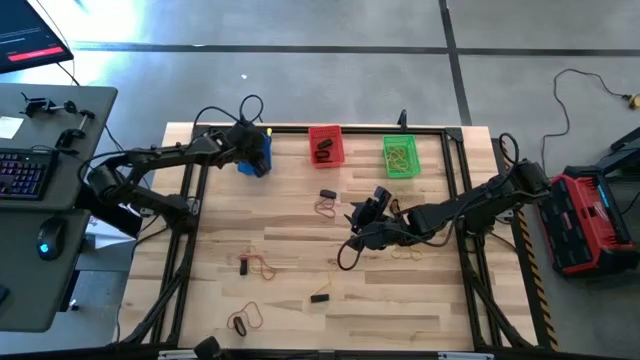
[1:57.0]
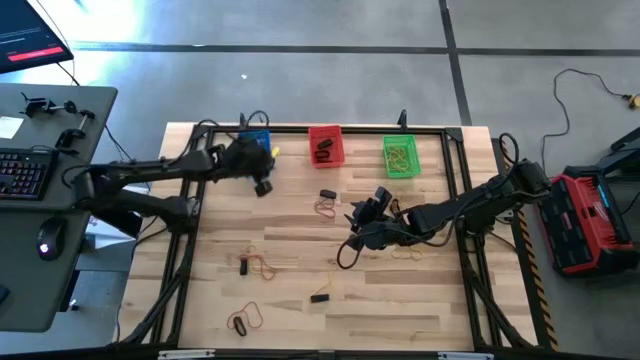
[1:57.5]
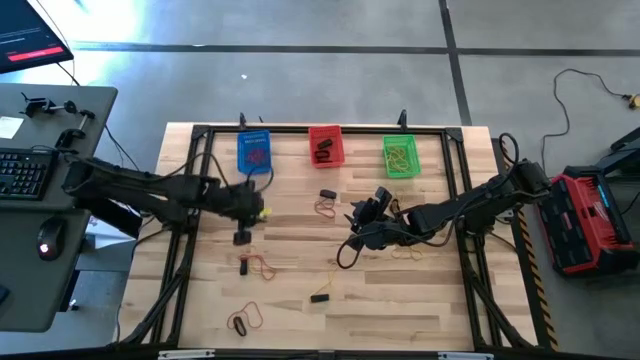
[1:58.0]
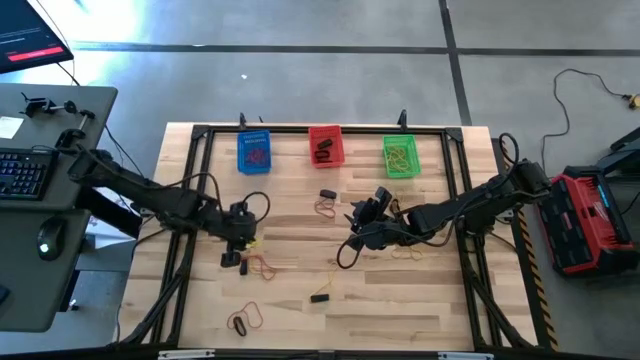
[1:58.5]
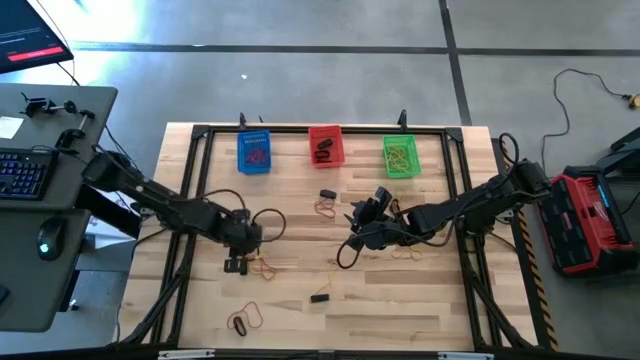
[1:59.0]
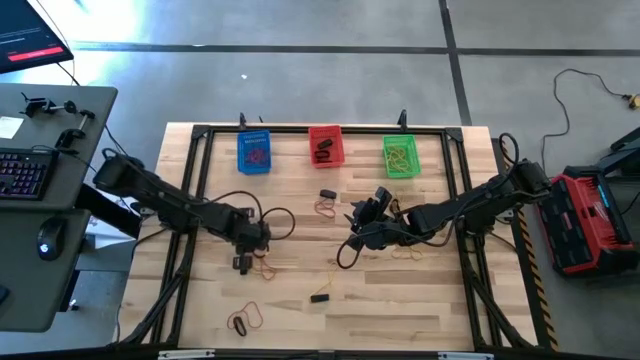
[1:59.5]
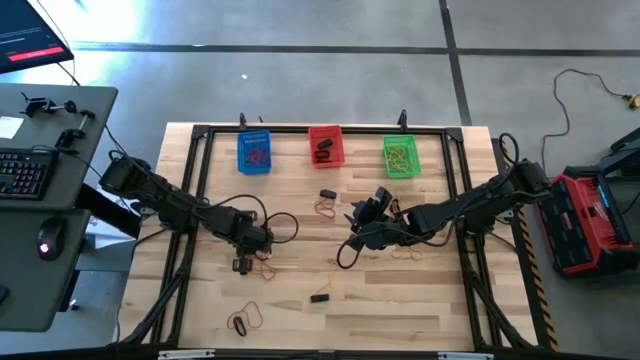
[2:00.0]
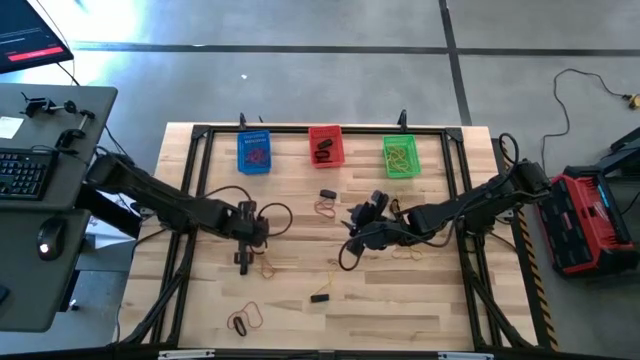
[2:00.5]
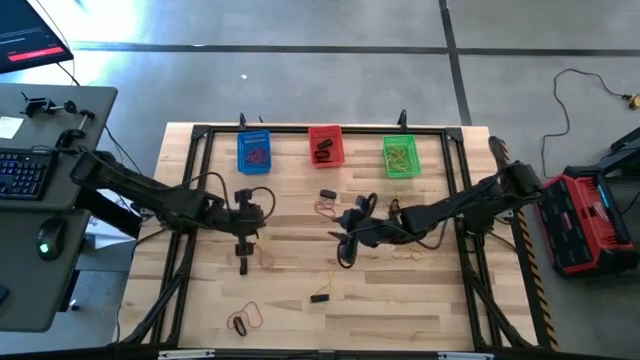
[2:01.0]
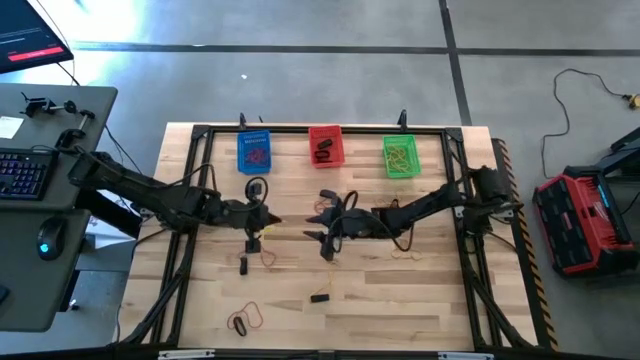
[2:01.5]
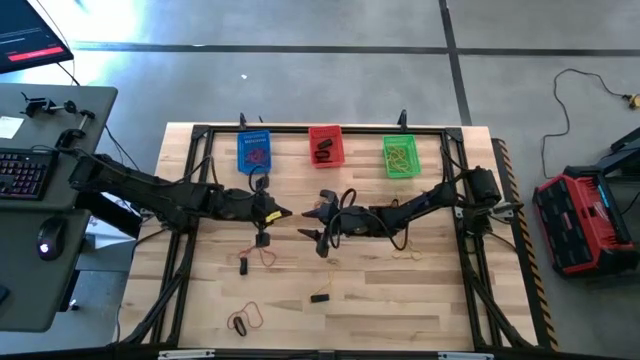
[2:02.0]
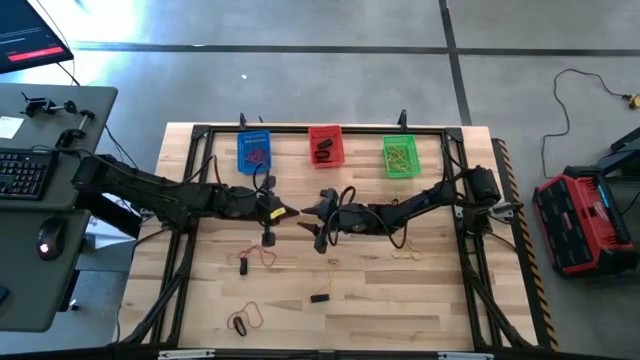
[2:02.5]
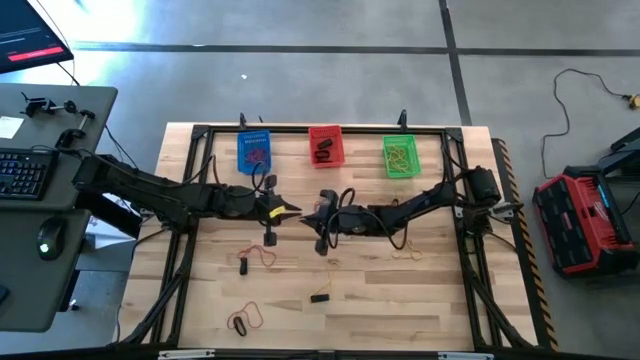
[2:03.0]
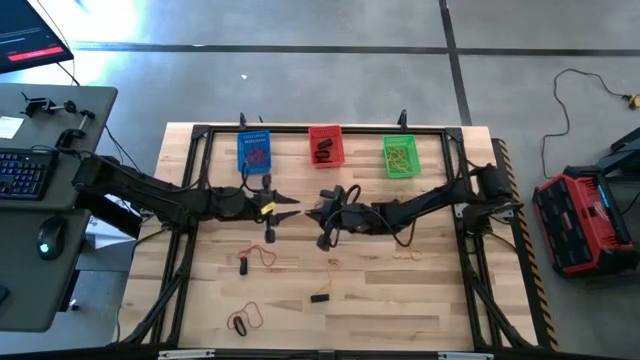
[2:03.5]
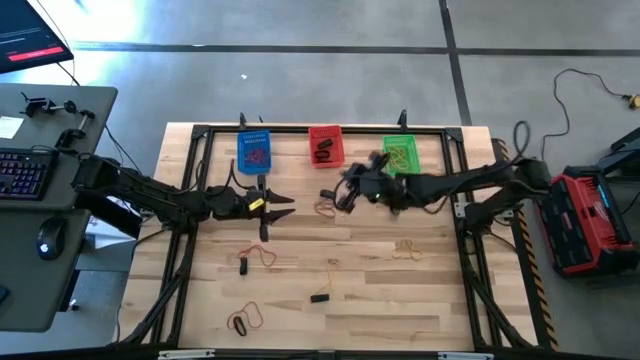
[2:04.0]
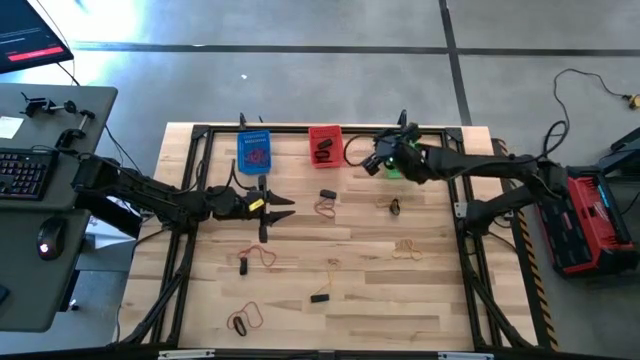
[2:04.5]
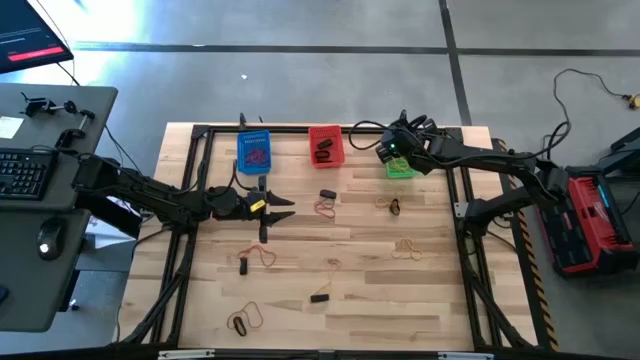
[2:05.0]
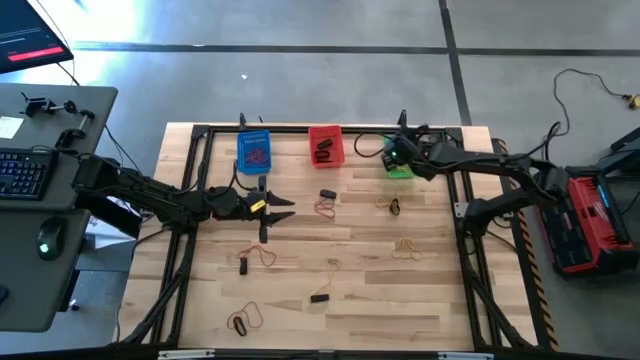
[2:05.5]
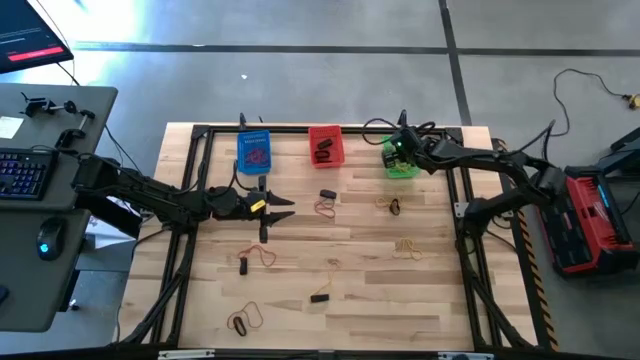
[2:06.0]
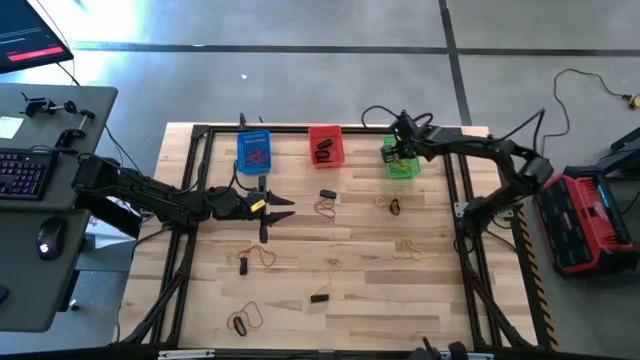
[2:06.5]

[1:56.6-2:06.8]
Task: Sort rubber bands into baskets
Put the yellow rubber band into the green bin

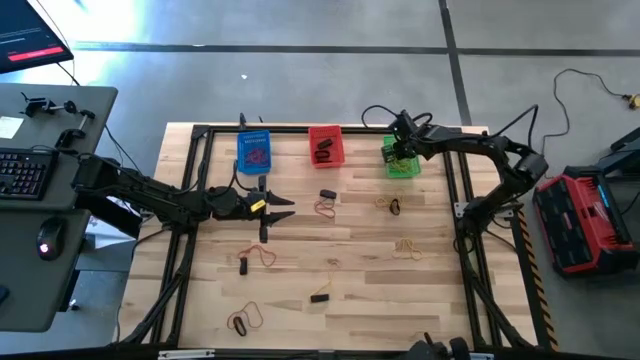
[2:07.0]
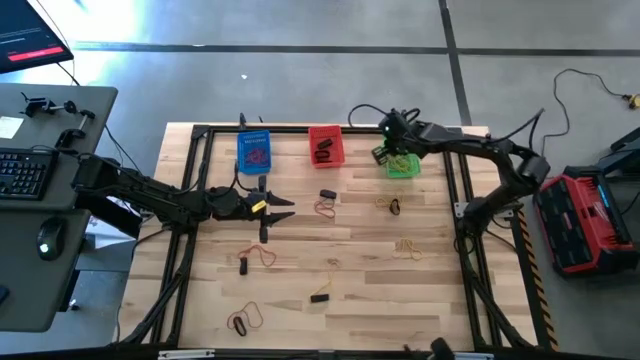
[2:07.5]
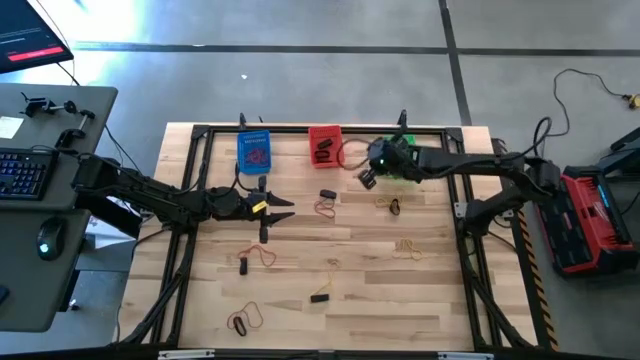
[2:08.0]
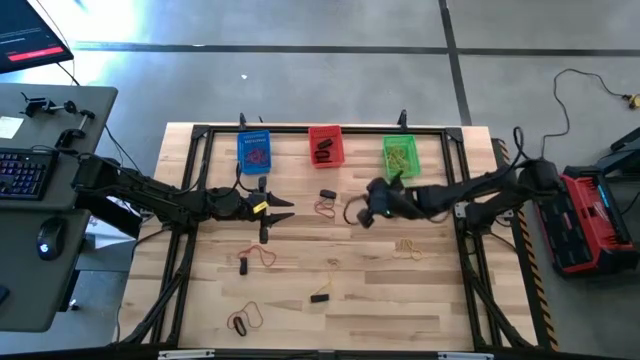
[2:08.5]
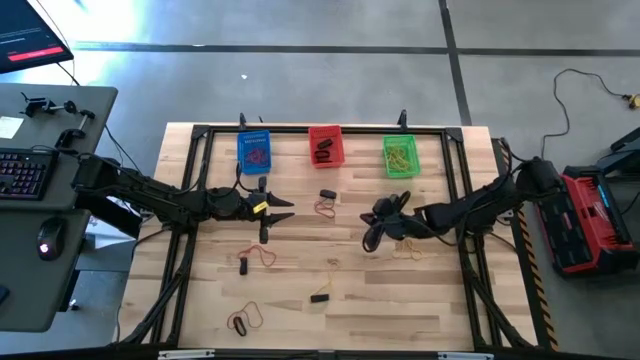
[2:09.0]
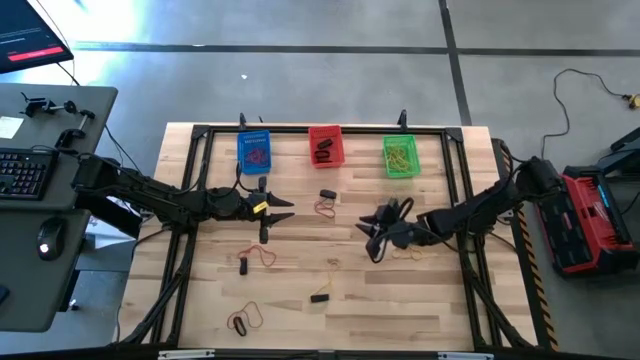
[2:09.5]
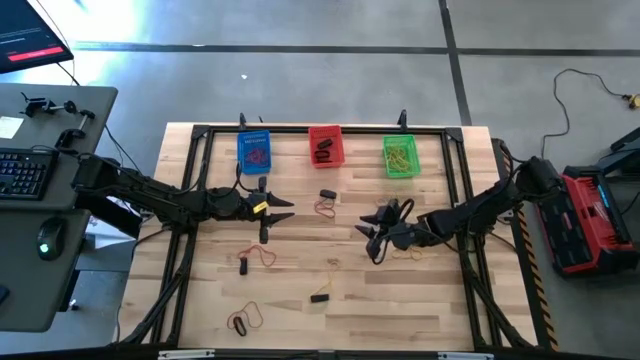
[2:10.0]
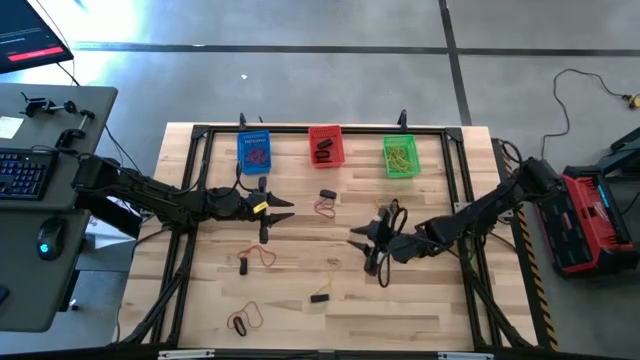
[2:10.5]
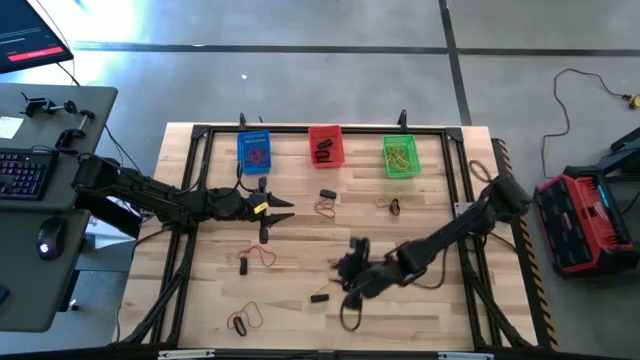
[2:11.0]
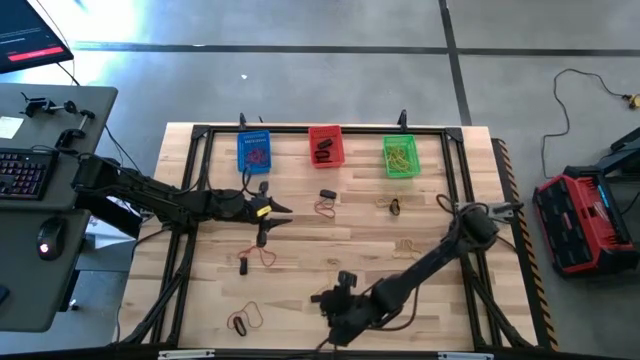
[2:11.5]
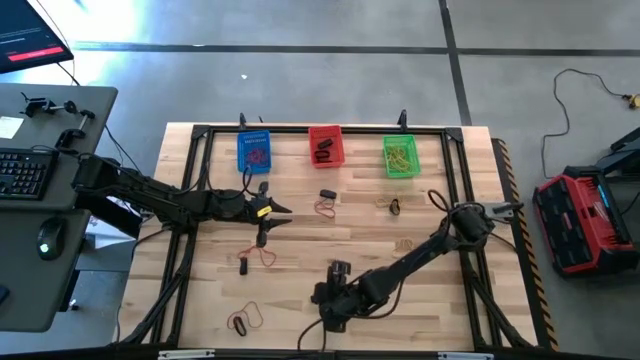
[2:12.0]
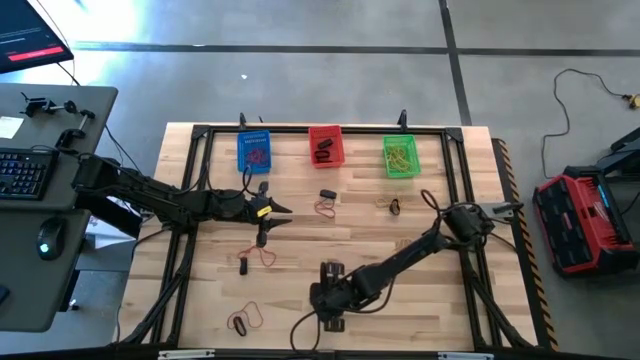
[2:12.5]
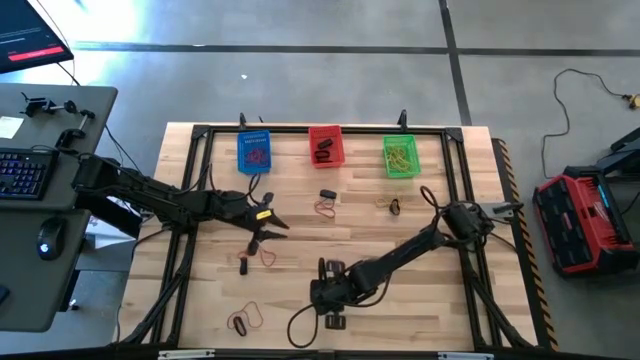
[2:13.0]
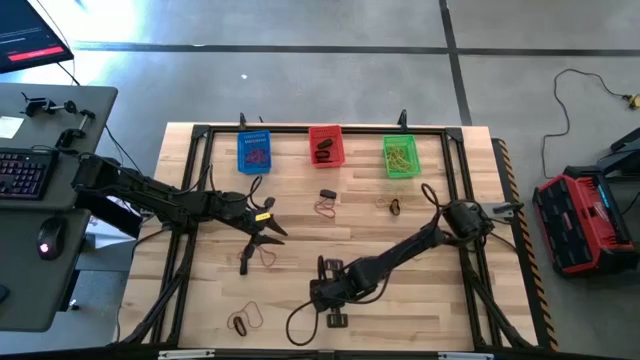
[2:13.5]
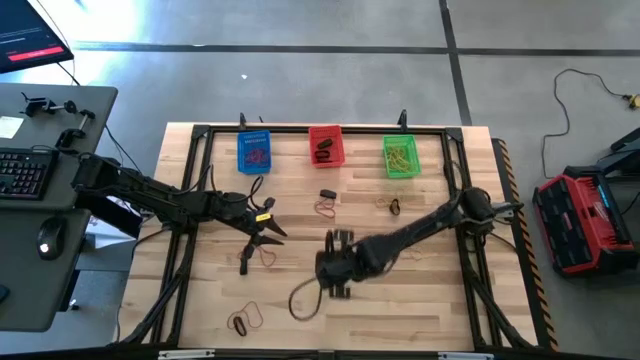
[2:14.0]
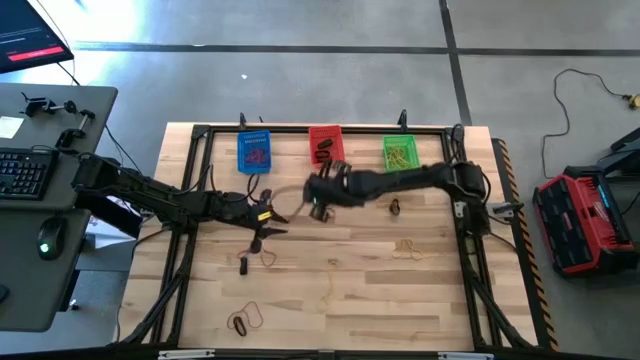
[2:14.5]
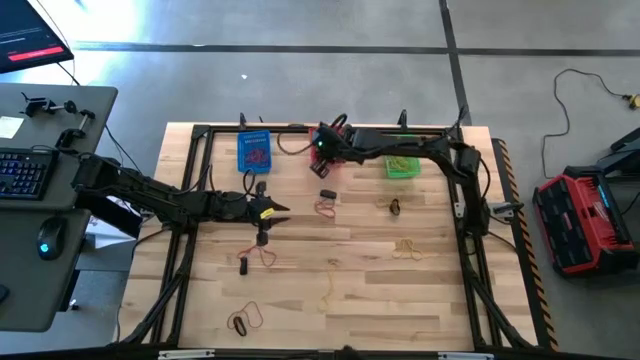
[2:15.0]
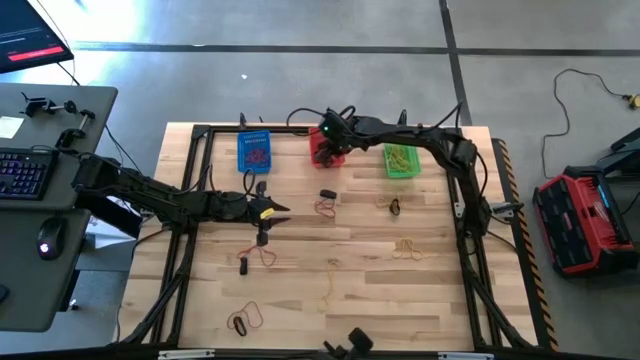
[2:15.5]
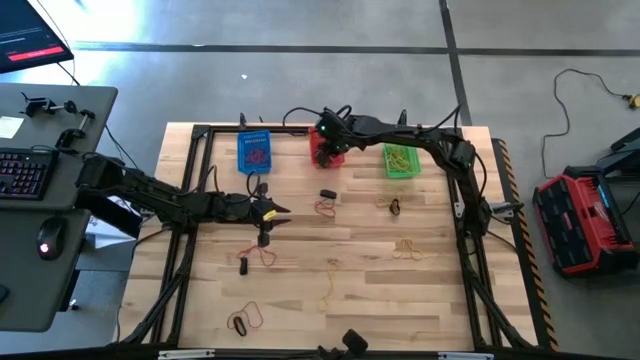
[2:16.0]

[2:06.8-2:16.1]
Put the black rubber band into the red bin
